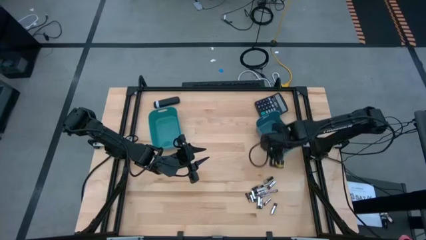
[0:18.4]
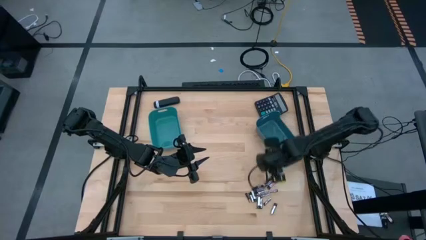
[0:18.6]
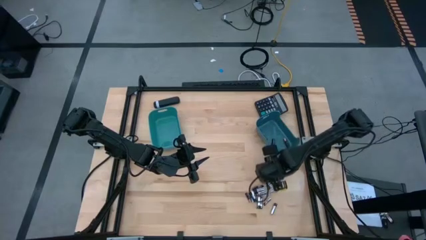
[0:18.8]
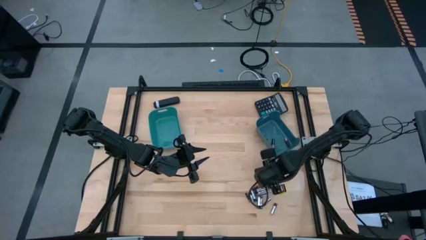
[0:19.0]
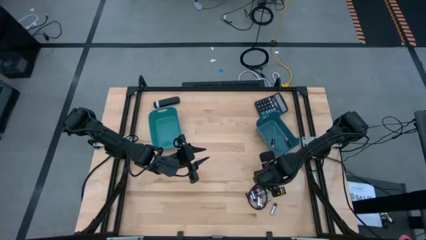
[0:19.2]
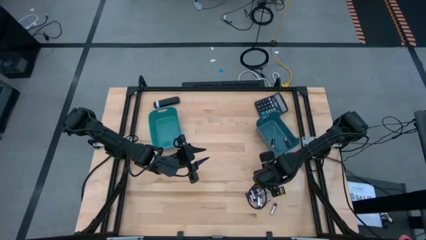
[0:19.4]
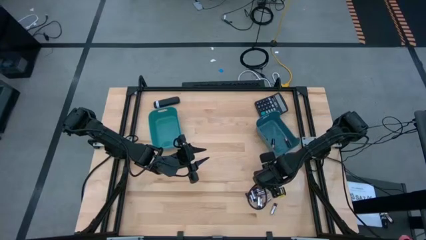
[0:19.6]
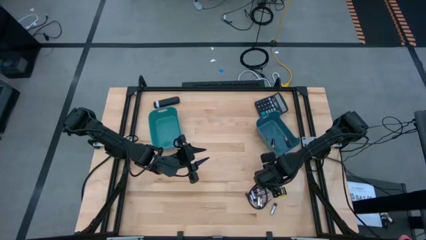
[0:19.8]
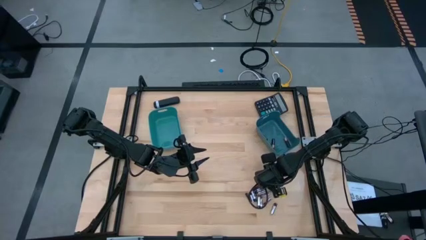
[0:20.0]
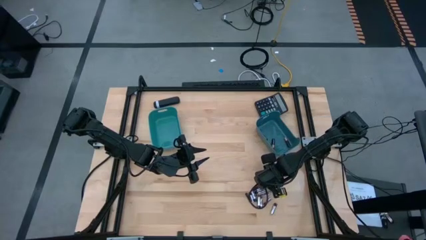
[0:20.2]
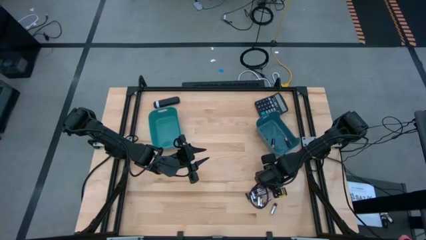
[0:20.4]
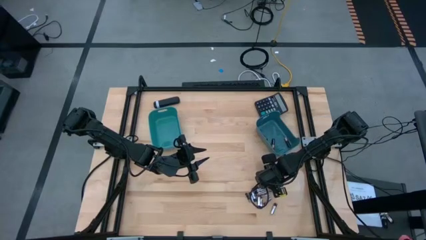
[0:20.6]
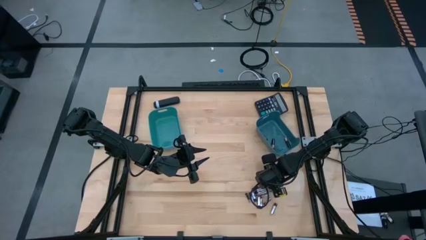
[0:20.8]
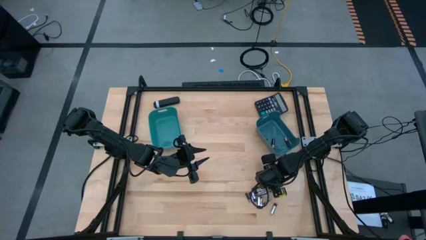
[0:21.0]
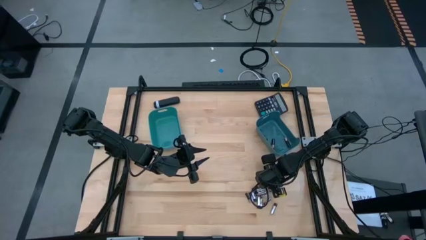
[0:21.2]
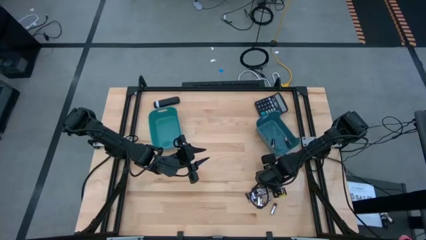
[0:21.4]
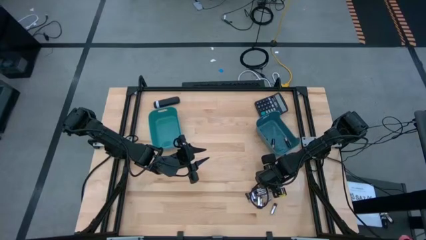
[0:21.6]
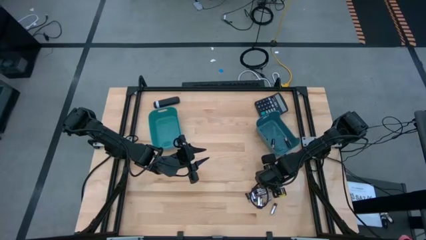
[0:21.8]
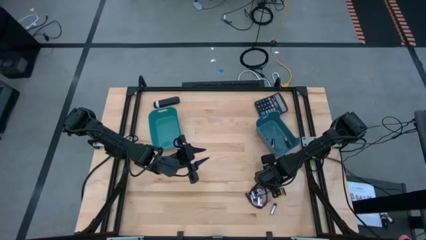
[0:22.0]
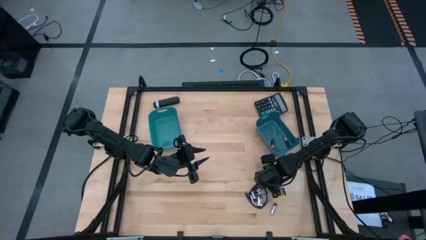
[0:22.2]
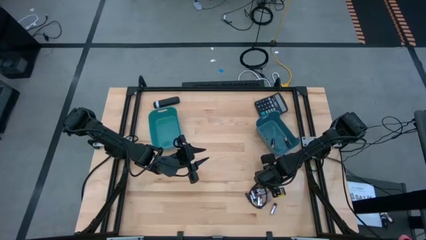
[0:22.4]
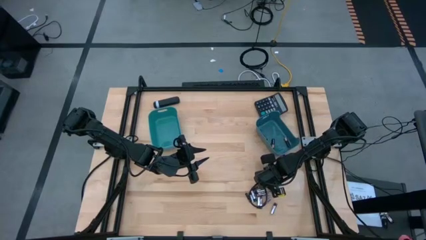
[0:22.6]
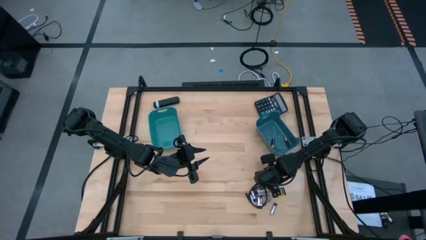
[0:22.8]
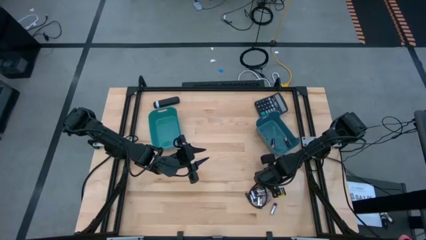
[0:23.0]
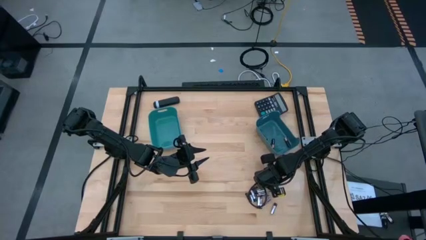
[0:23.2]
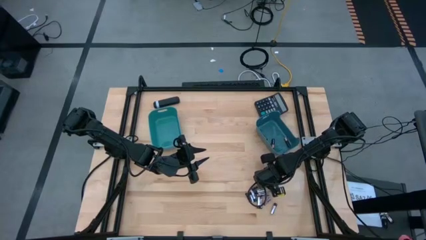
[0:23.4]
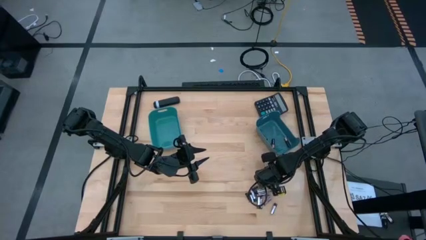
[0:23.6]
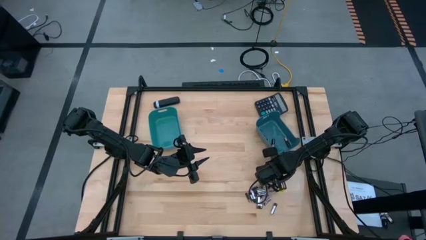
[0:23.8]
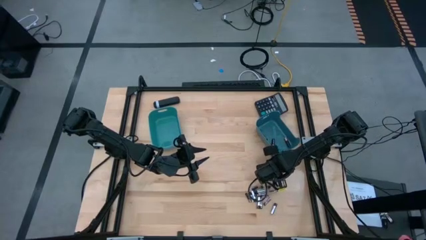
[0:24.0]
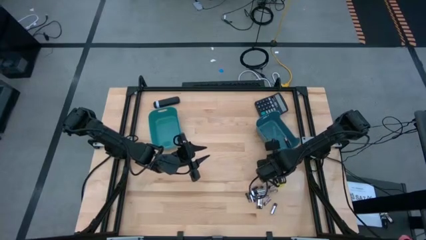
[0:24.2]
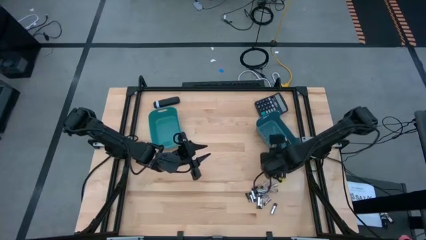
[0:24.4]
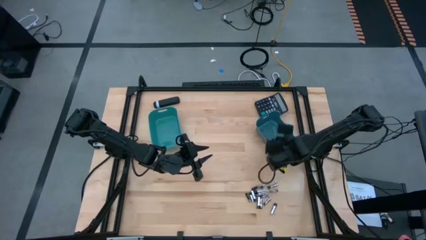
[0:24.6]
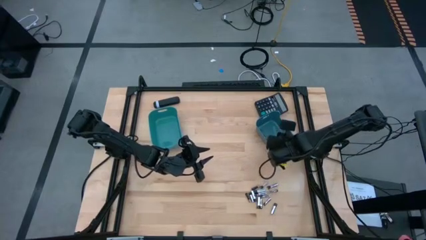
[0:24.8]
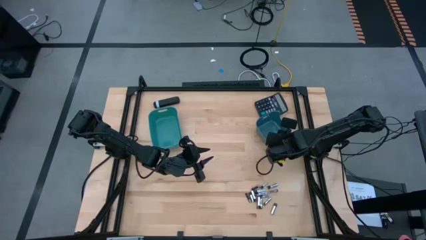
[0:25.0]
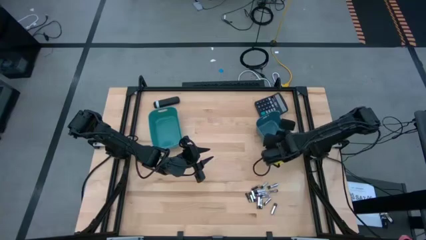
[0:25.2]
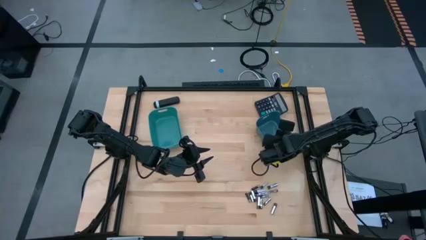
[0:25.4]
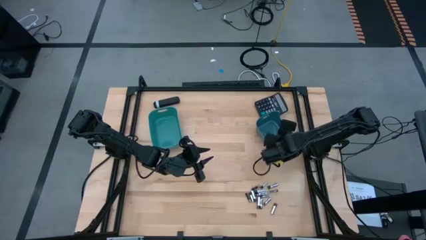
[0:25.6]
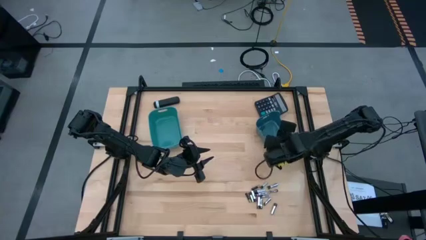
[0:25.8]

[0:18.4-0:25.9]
Task: Sort batteries
Put the black battery into the dark blue bin

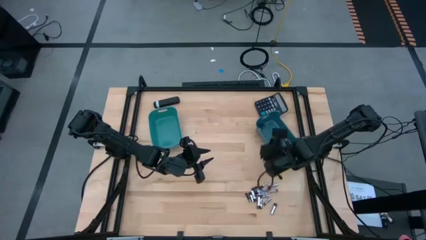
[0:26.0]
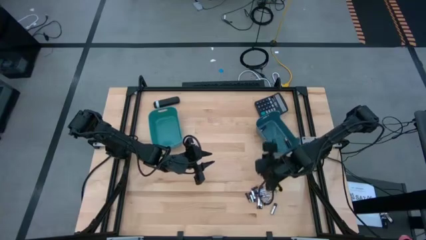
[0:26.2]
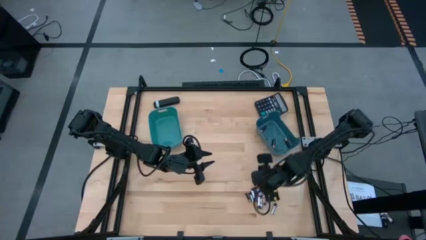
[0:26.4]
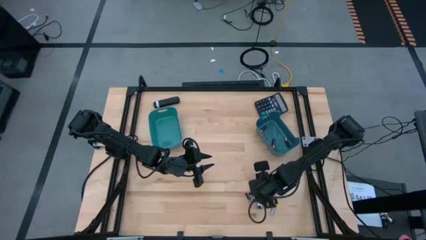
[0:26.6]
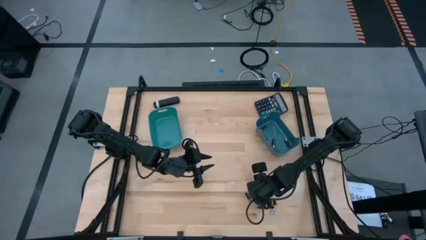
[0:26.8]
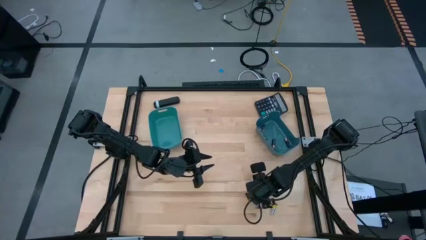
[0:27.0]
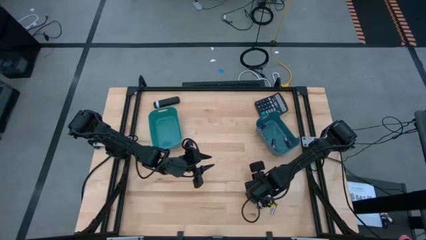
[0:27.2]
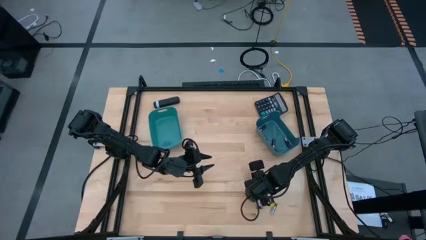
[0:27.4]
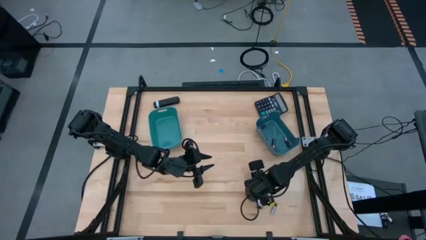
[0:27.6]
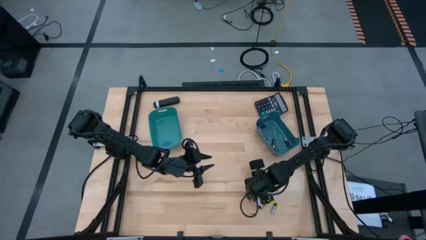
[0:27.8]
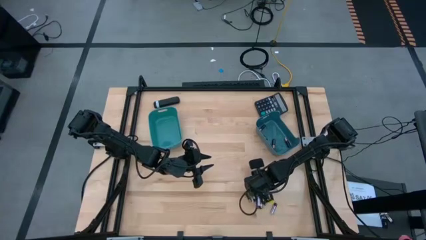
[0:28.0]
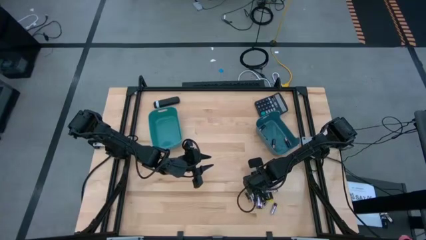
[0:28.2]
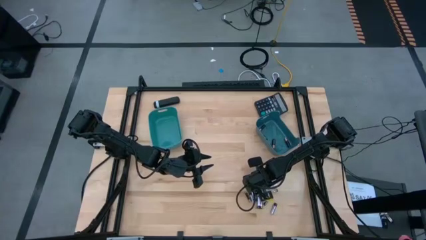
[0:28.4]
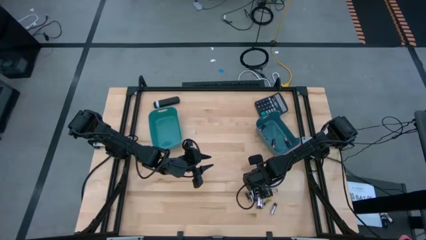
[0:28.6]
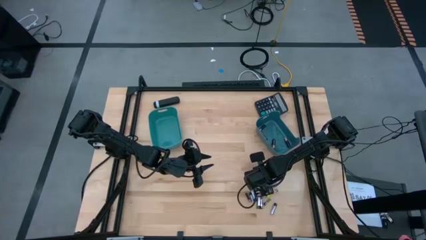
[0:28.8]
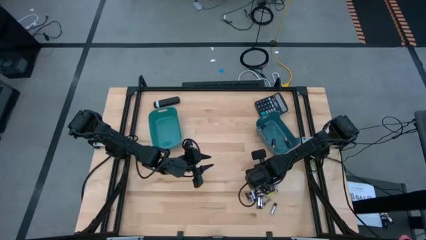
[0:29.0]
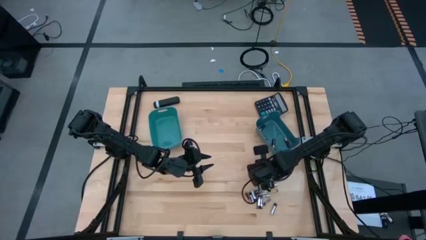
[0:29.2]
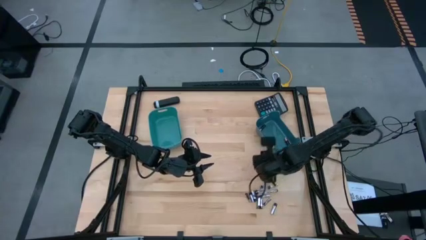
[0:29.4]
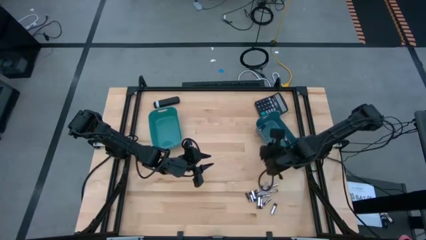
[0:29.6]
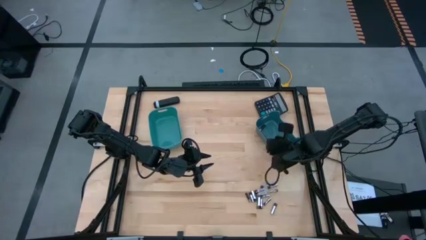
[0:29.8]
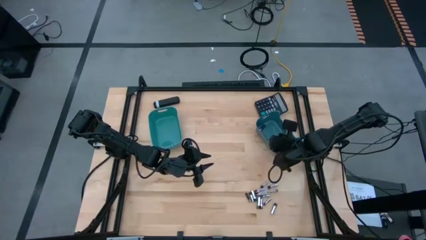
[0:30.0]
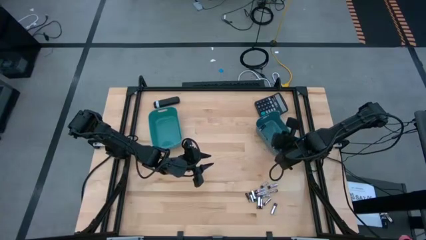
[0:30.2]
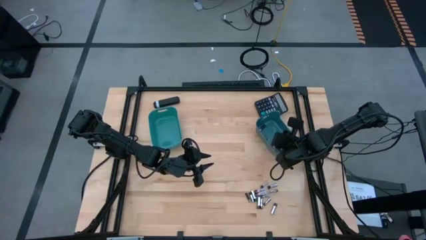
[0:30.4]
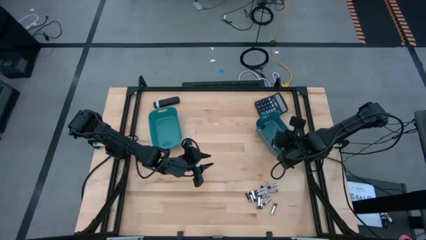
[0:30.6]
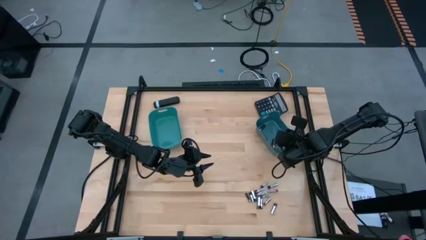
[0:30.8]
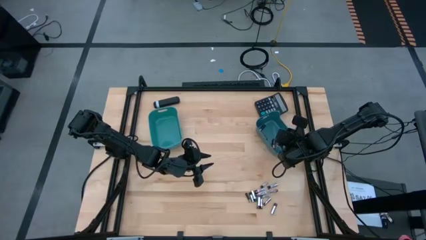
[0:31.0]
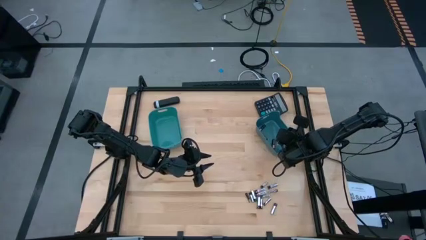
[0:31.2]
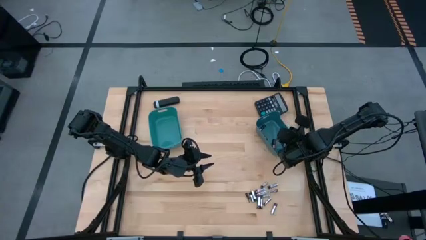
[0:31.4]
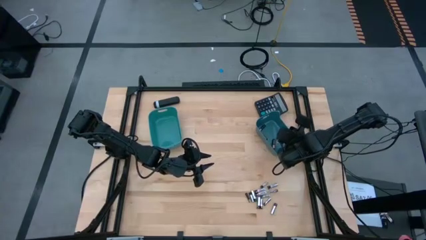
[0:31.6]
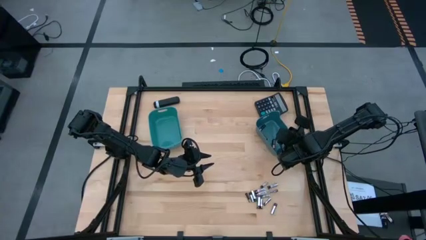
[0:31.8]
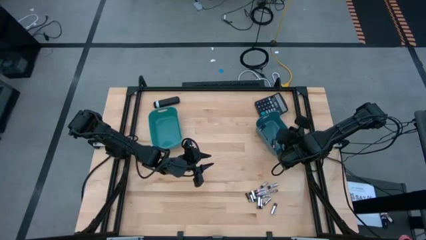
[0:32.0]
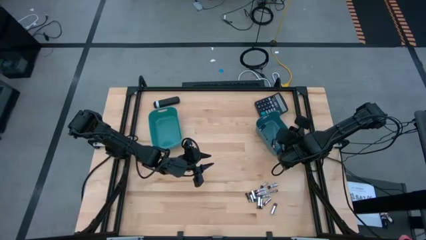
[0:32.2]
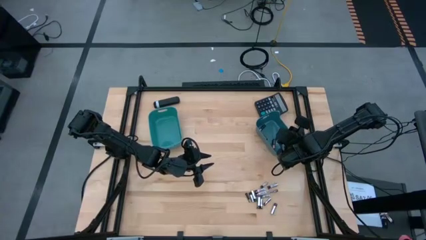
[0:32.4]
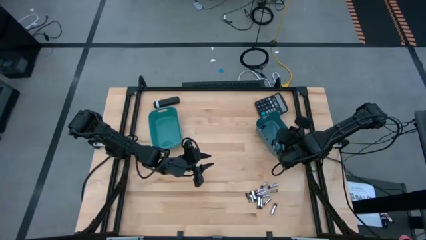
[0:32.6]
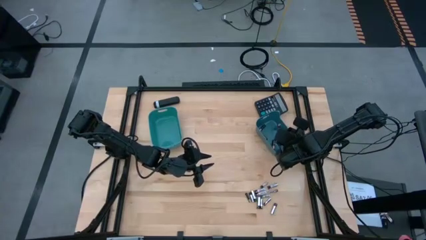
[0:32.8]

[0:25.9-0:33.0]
Put the black battery into the dark blue bin

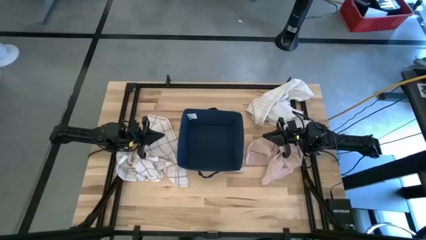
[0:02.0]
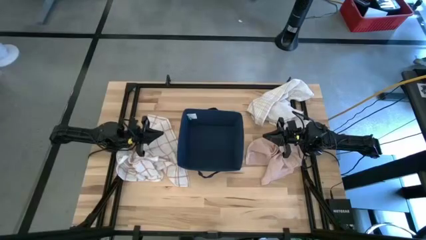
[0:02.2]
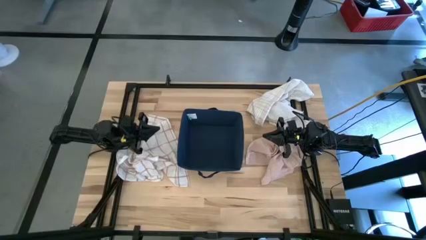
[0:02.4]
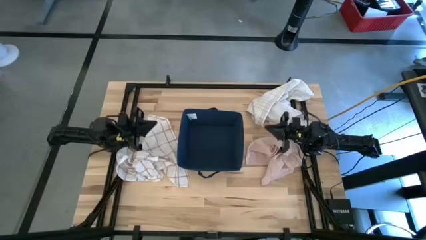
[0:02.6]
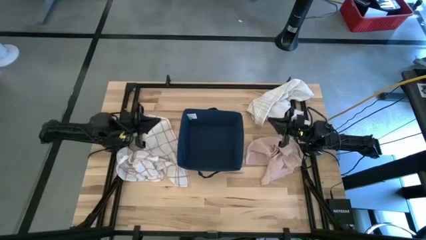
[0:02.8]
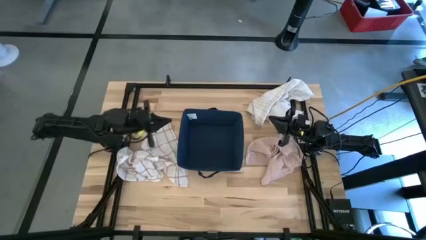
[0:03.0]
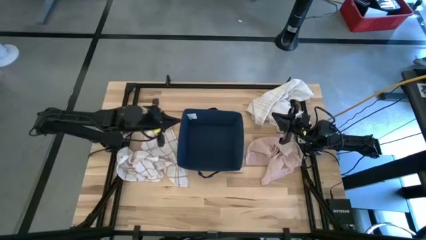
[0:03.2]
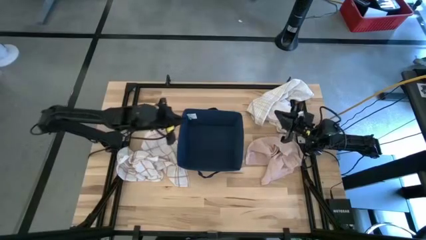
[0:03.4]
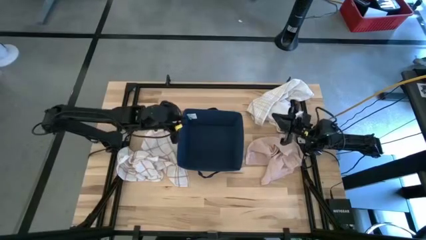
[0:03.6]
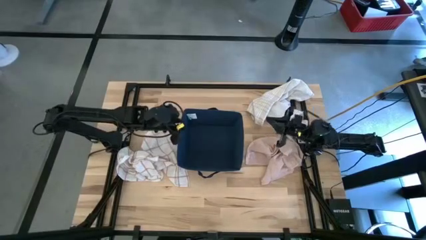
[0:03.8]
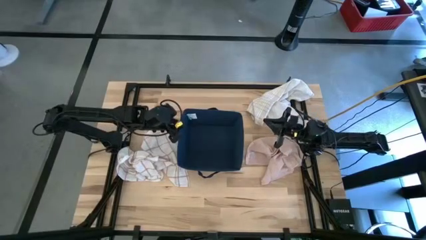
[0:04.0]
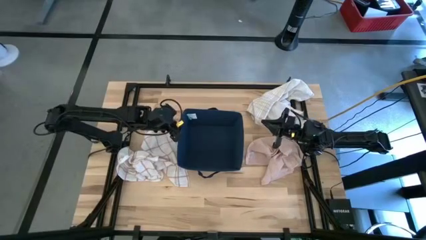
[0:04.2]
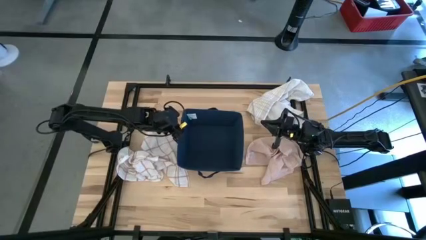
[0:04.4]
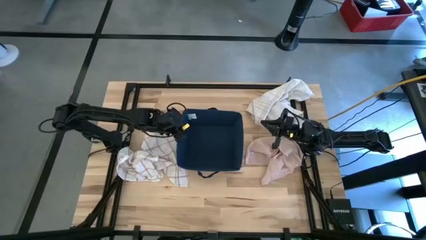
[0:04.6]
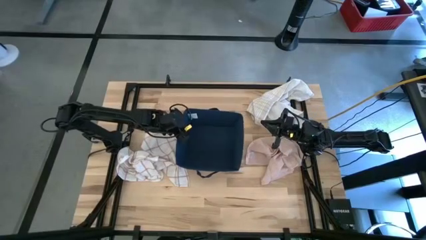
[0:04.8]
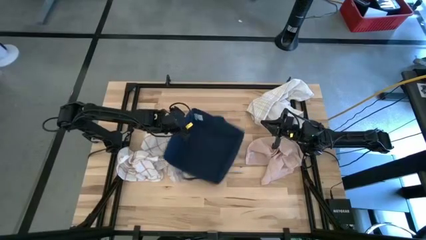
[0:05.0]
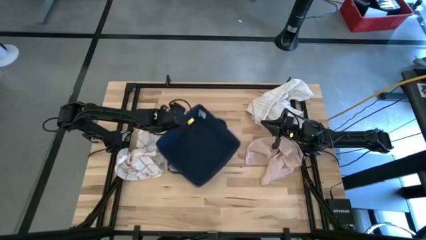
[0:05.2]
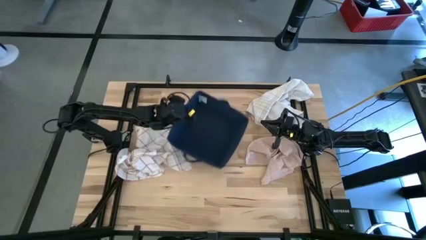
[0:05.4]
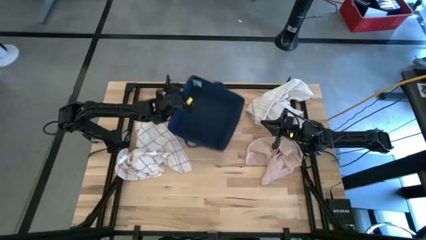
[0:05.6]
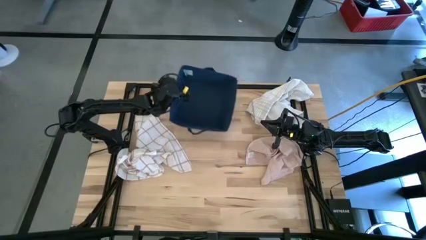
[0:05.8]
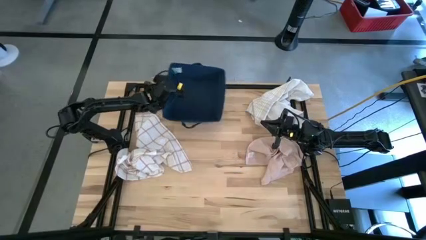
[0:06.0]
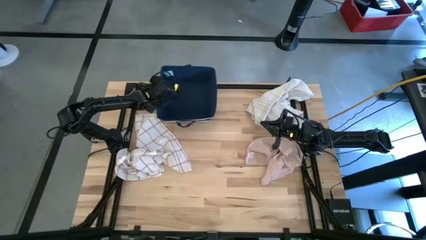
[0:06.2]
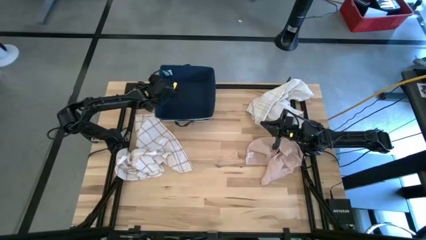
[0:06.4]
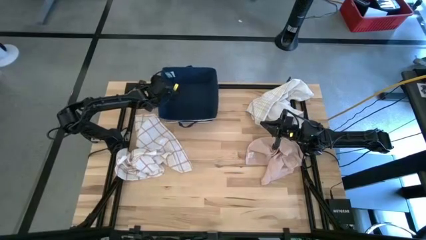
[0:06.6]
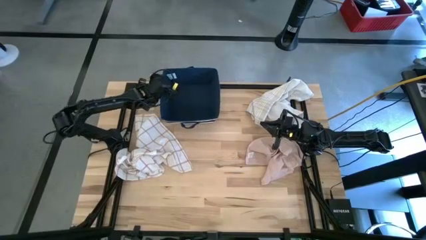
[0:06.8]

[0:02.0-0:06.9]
Task: Fold towel
Move the laundry bin from the center to the top left of the table
